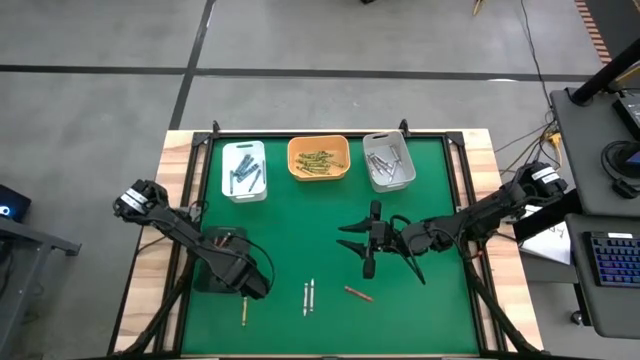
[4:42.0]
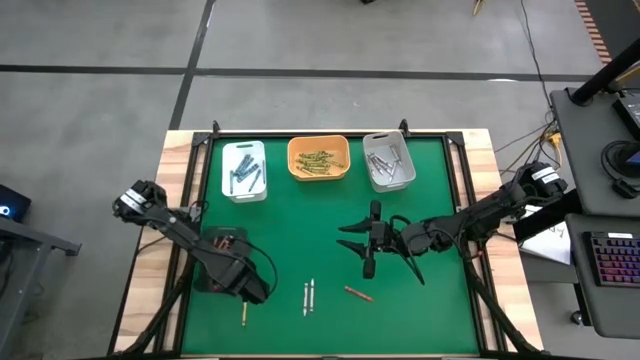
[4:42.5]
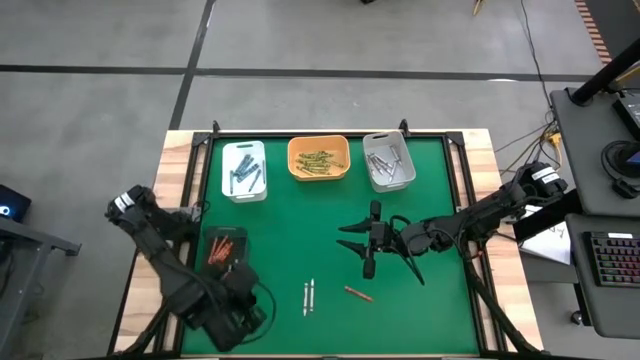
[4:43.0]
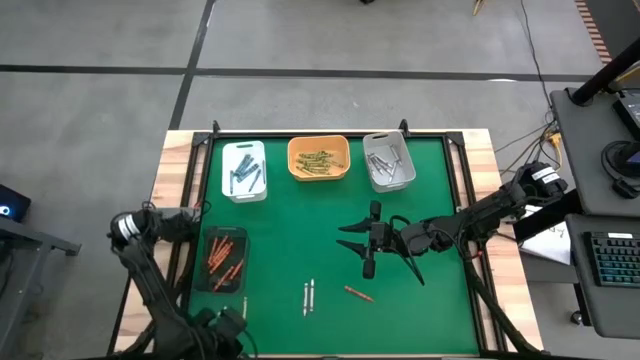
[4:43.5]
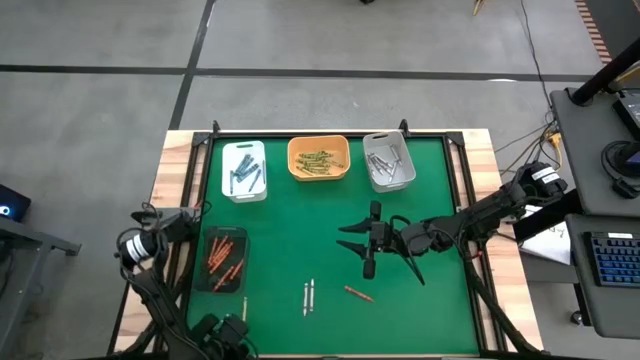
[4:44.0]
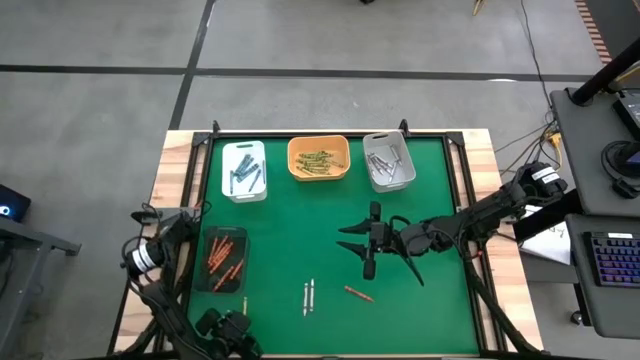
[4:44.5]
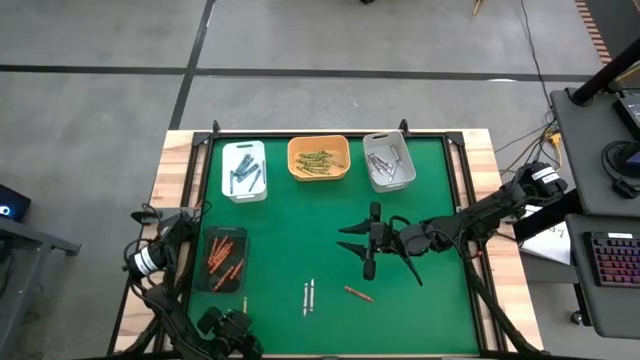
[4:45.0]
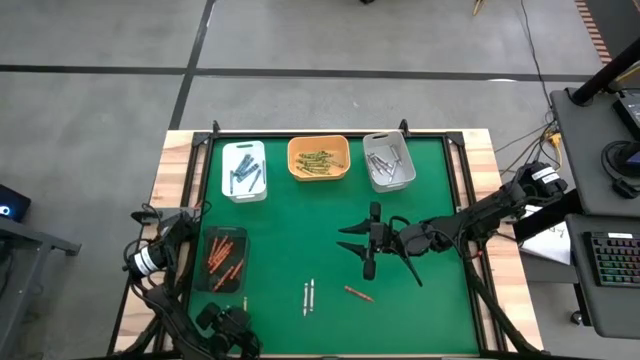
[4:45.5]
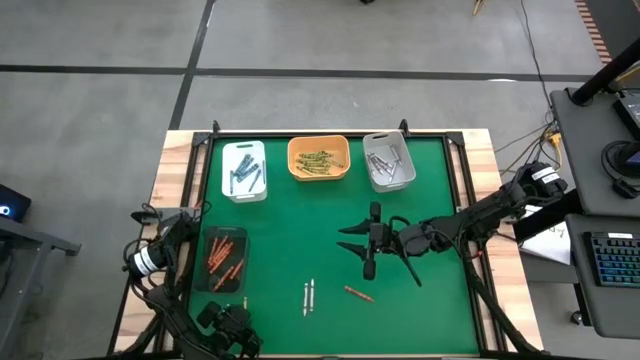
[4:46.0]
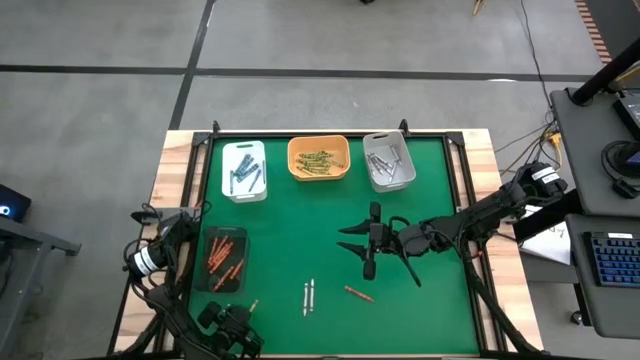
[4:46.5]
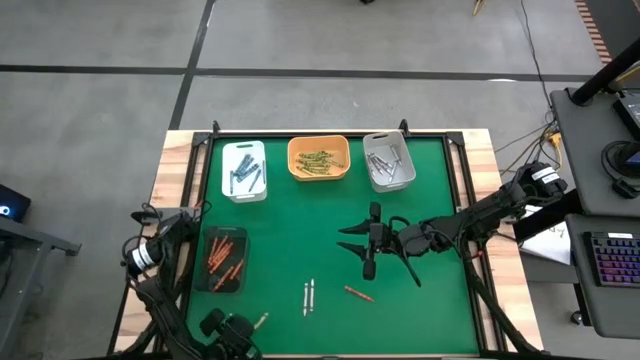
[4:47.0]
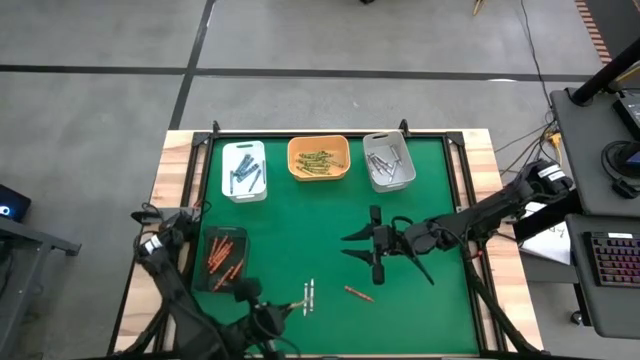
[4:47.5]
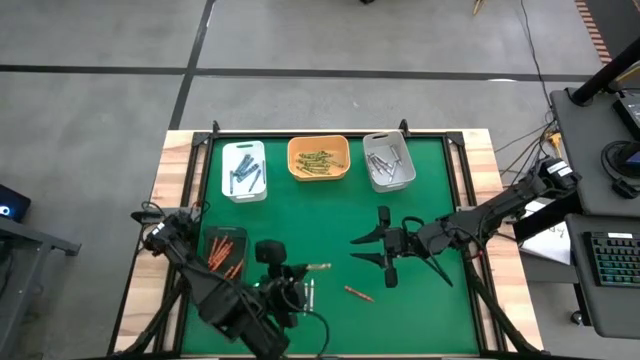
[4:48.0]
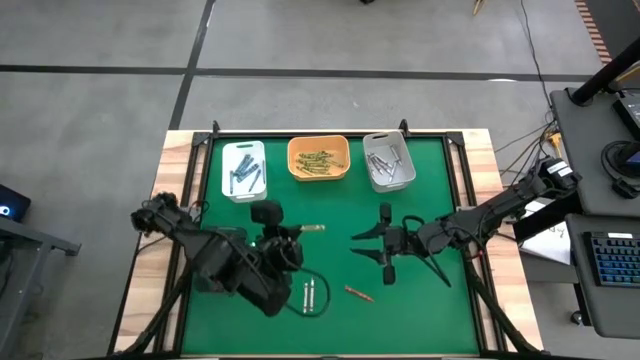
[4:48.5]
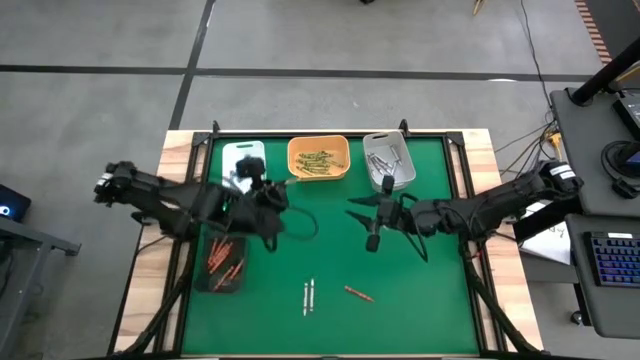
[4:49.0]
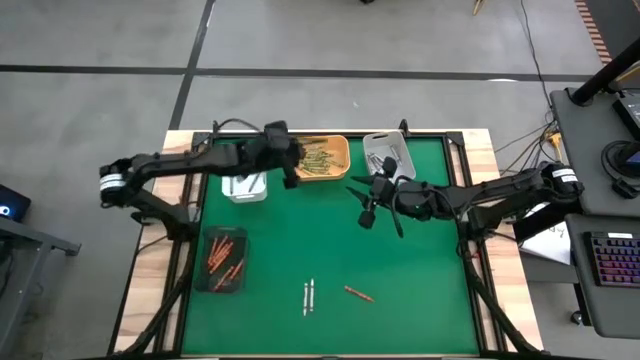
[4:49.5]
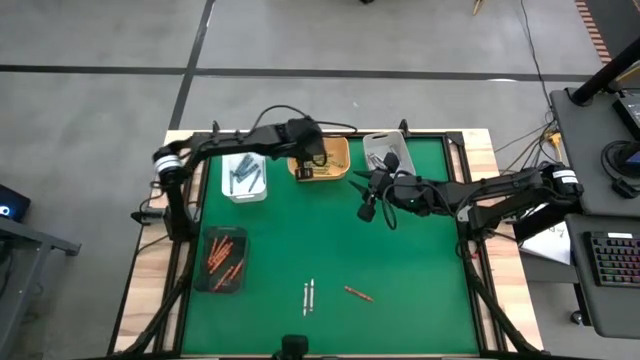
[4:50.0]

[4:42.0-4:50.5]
Task: Sort crayons
Put the green crayon into the yellow bin

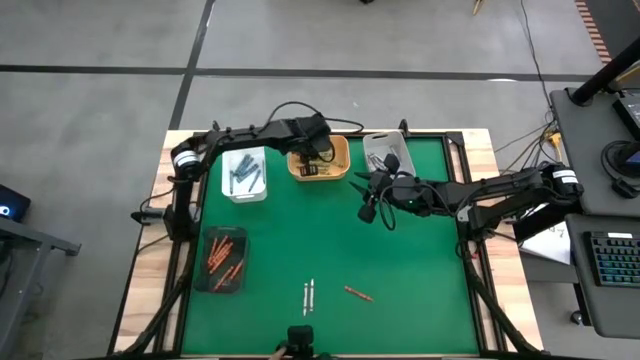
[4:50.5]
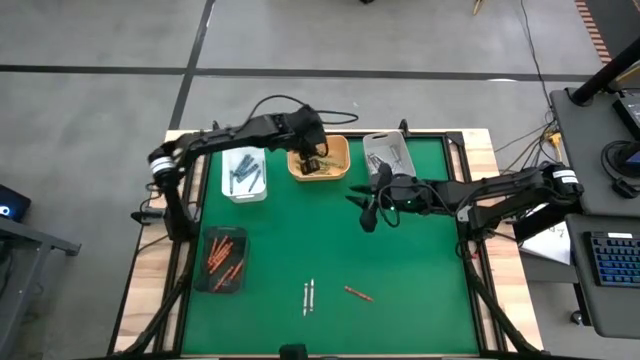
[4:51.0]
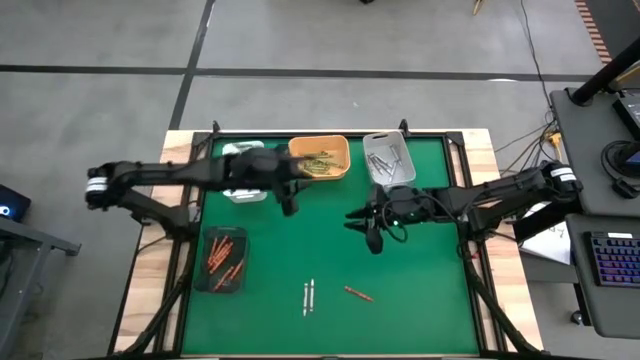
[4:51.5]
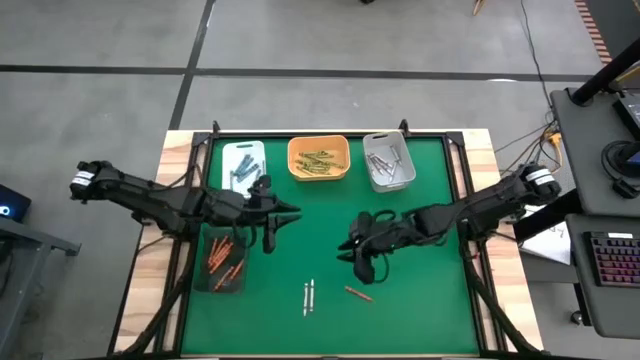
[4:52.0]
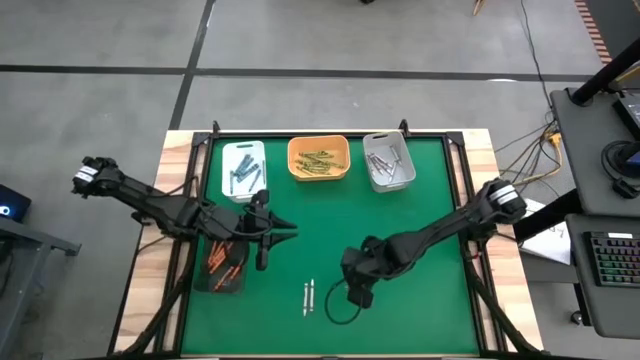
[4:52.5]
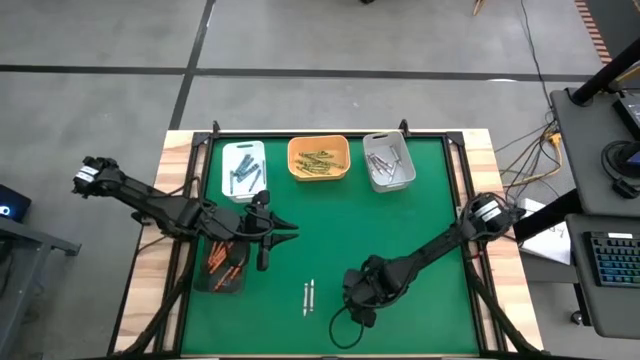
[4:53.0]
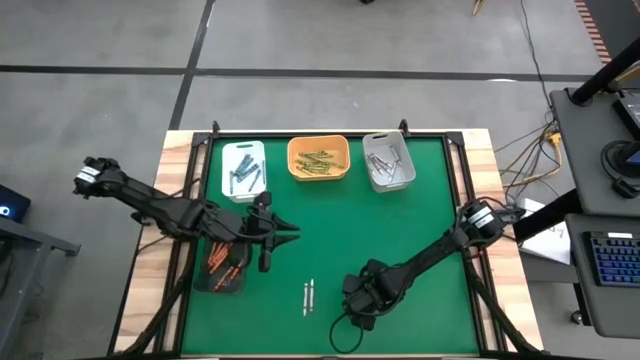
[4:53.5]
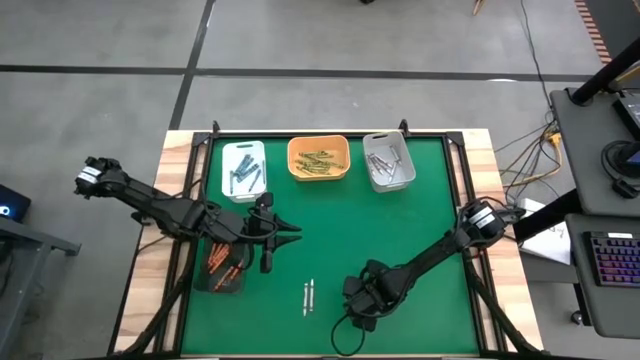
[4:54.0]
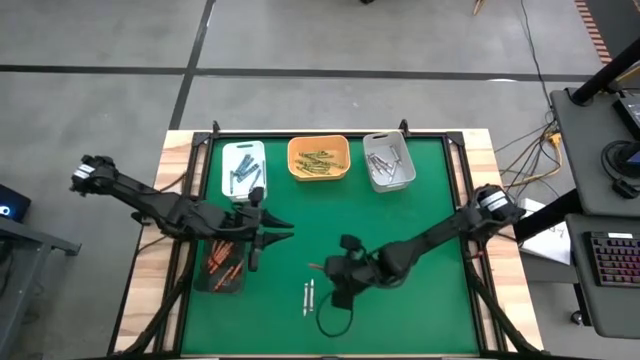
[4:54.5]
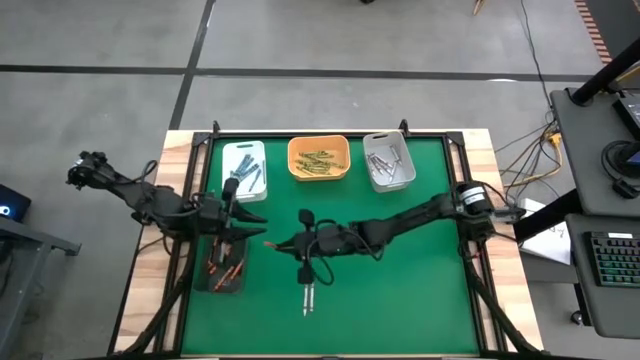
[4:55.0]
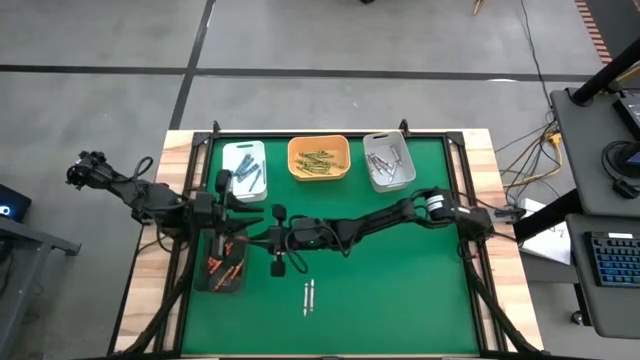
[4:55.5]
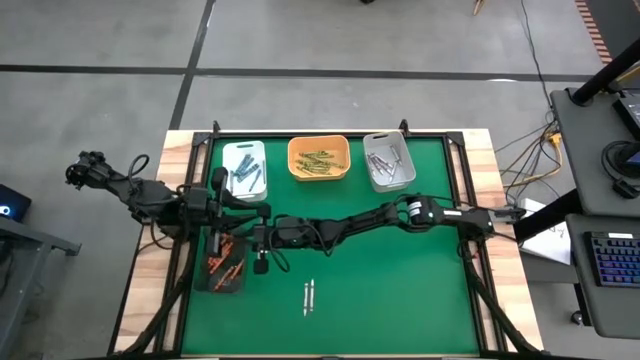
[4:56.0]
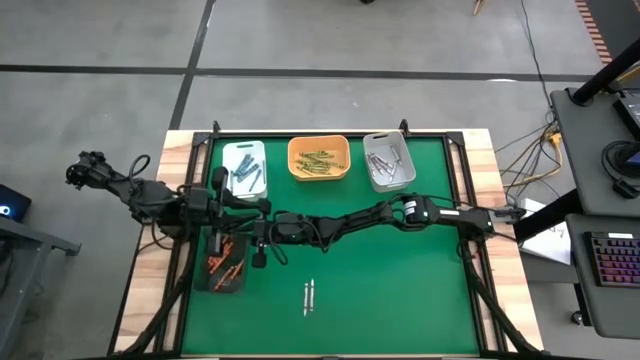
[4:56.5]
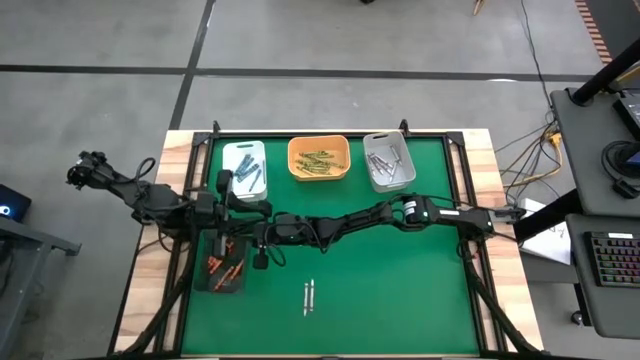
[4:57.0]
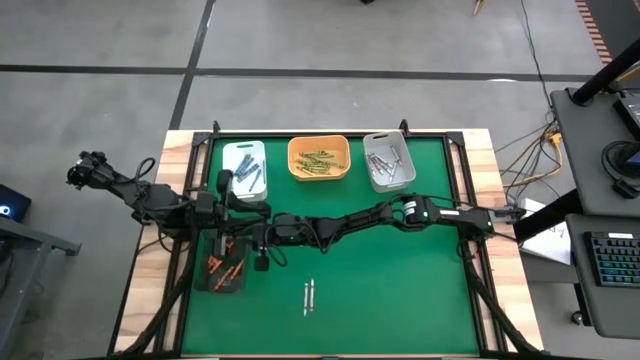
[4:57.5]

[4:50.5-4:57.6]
Put the orange crayon into the black bin

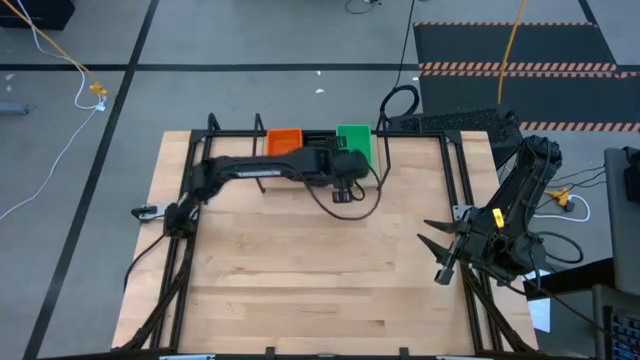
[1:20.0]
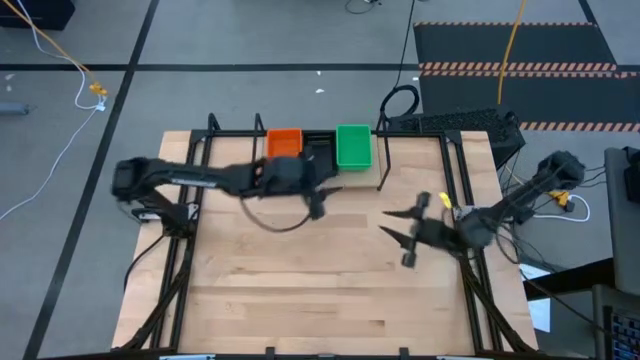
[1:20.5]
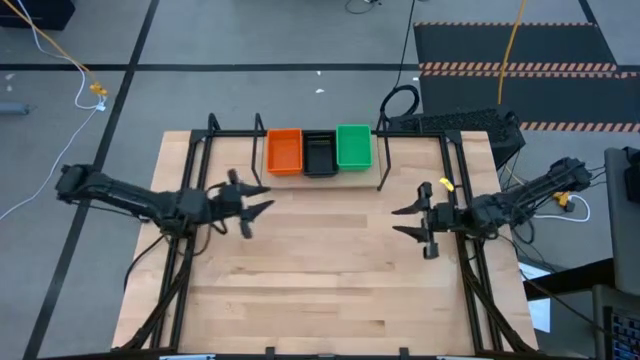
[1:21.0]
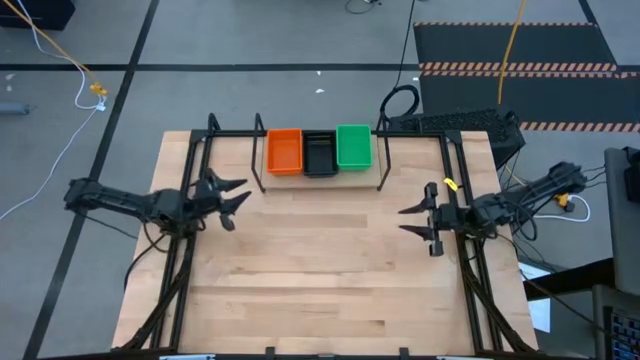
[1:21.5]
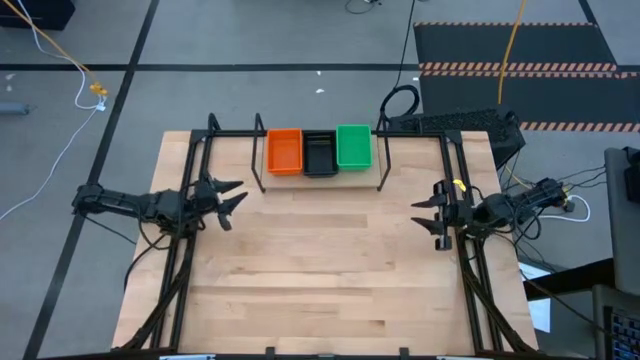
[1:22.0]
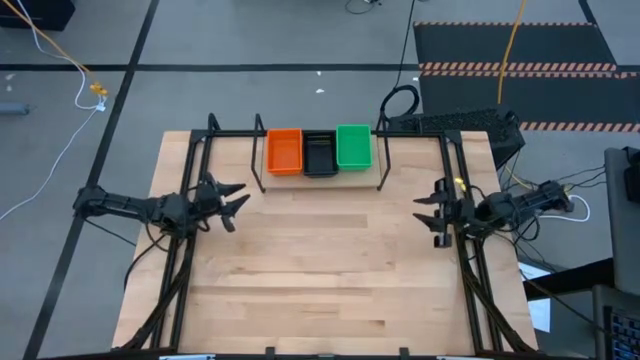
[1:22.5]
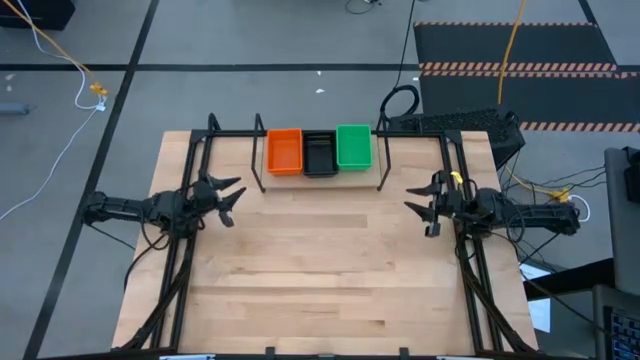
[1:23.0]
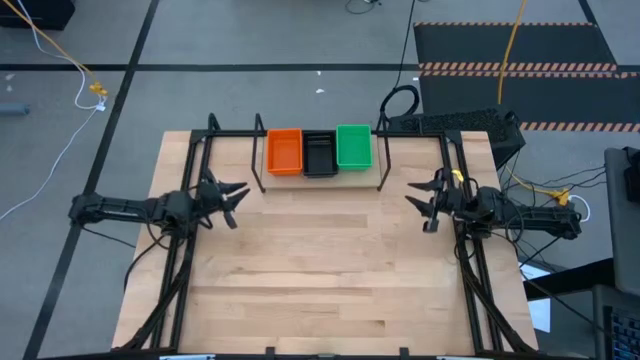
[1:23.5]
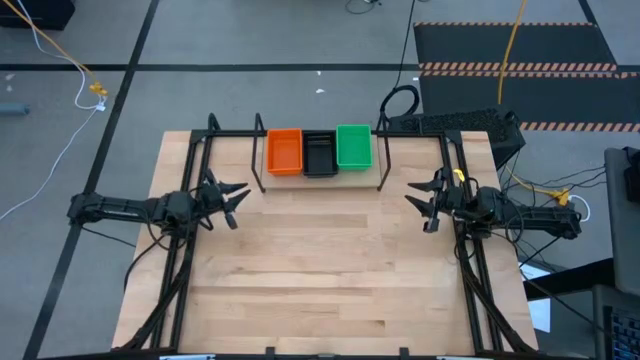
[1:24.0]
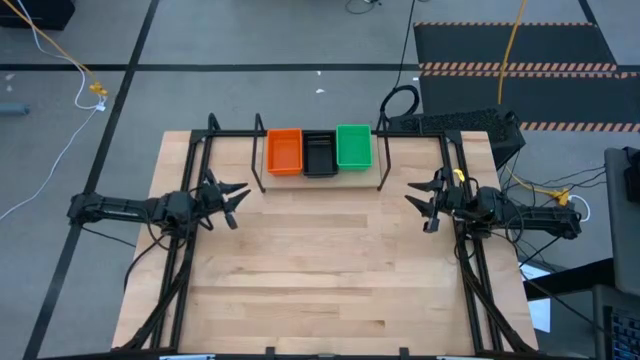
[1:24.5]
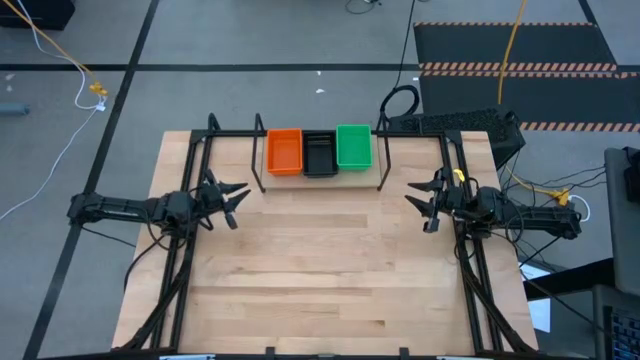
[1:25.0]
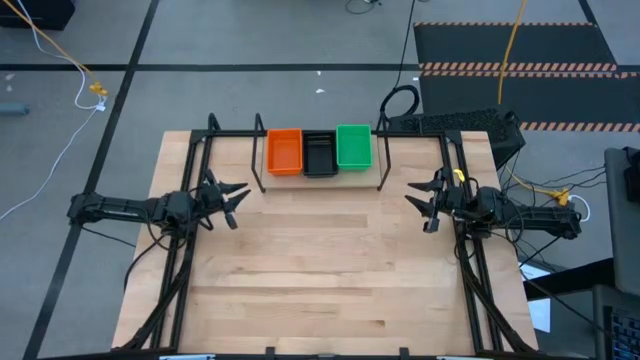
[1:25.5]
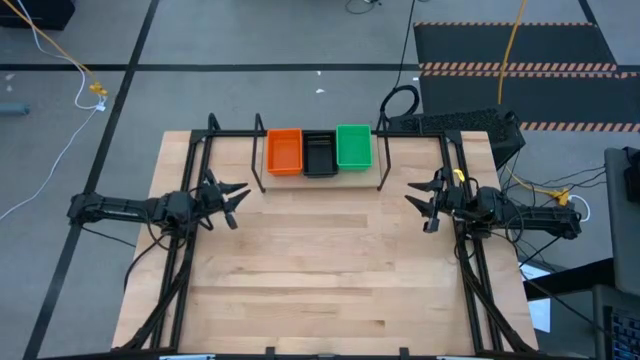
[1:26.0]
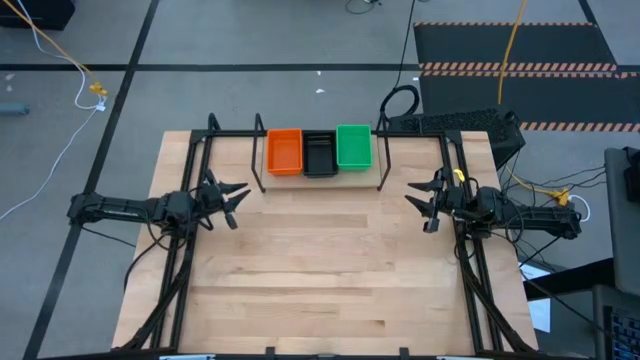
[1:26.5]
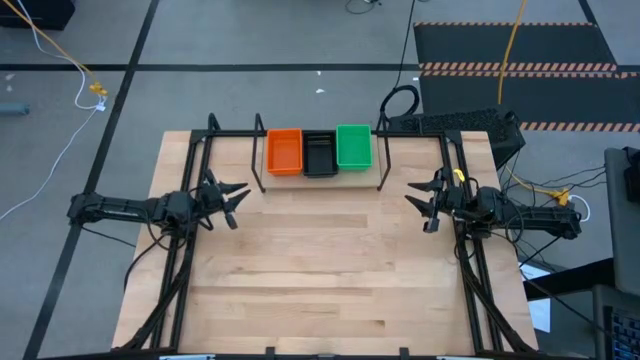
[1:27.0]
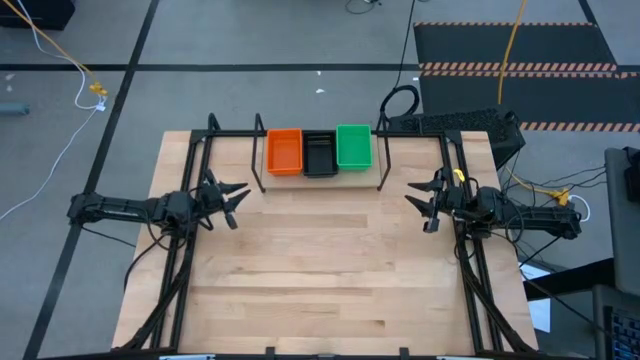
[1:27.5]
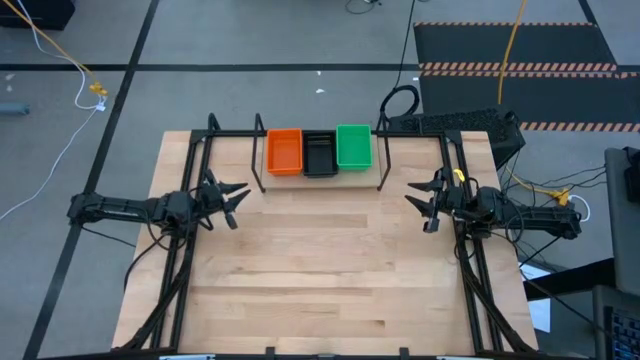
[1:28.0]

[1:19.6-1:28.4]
Task: Stack baskets on shelf by color
Return to Home Position
